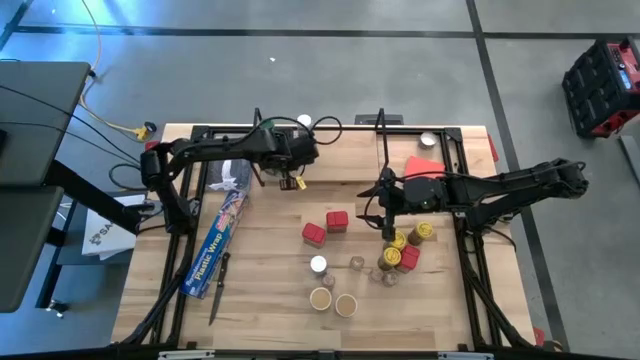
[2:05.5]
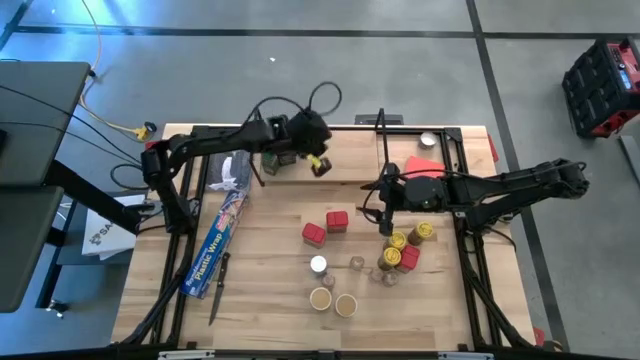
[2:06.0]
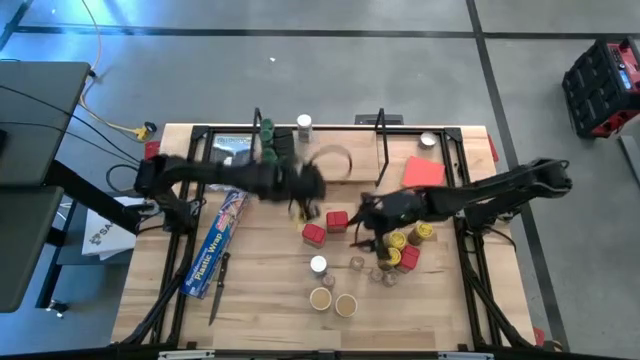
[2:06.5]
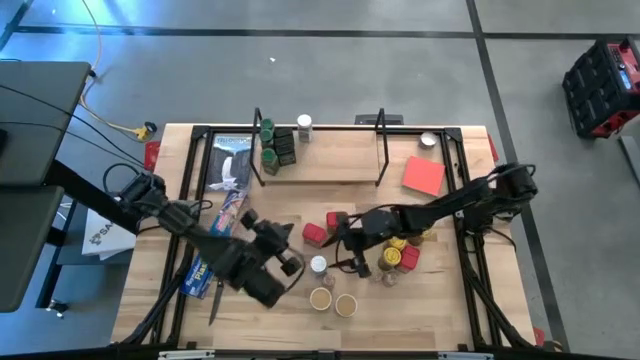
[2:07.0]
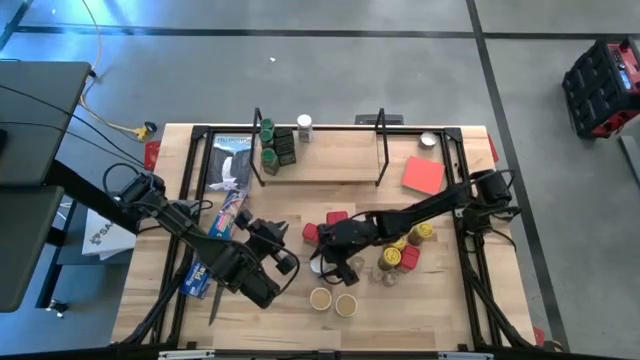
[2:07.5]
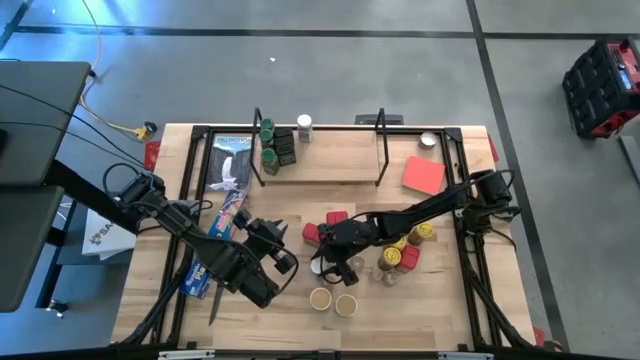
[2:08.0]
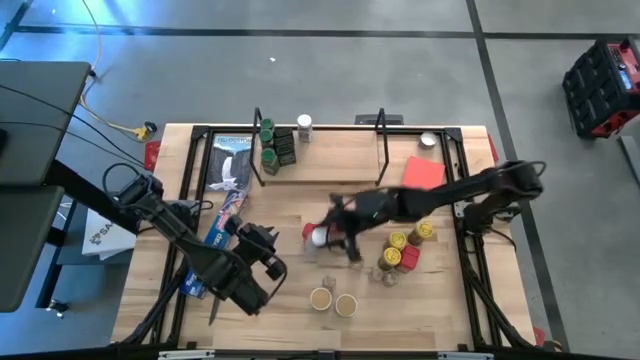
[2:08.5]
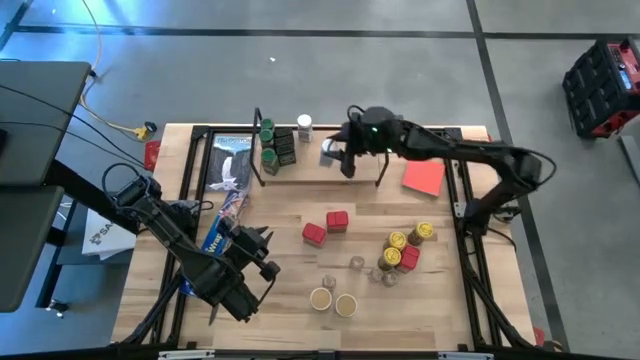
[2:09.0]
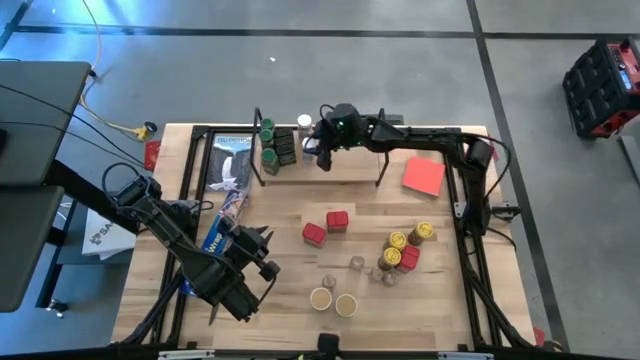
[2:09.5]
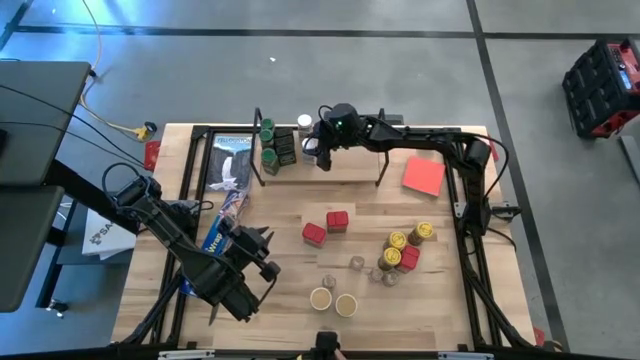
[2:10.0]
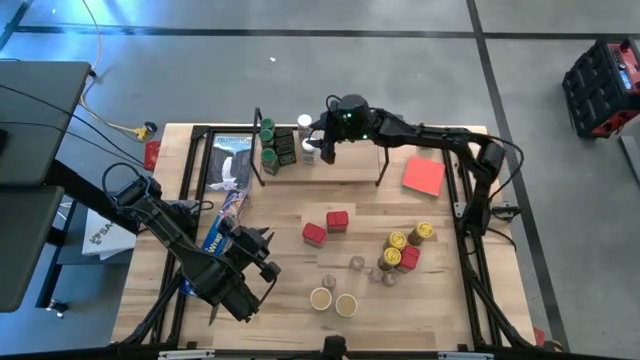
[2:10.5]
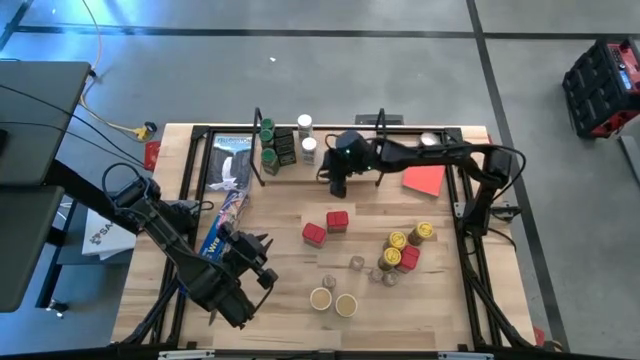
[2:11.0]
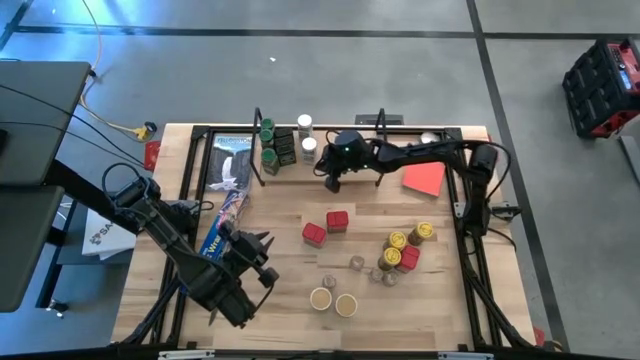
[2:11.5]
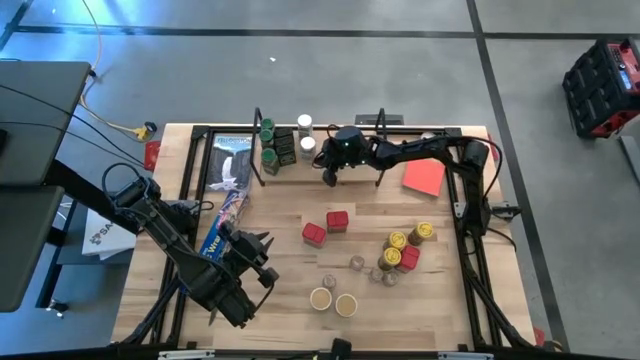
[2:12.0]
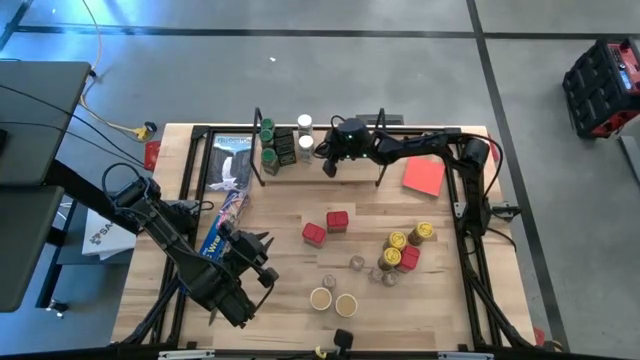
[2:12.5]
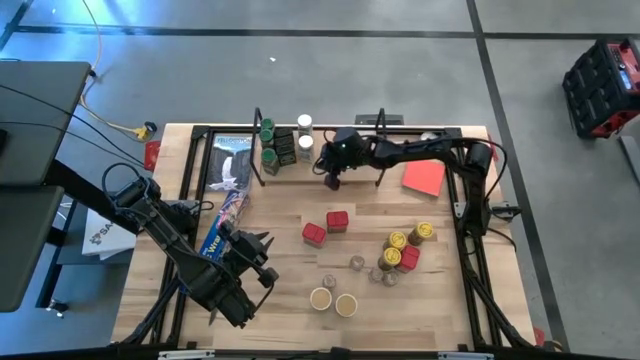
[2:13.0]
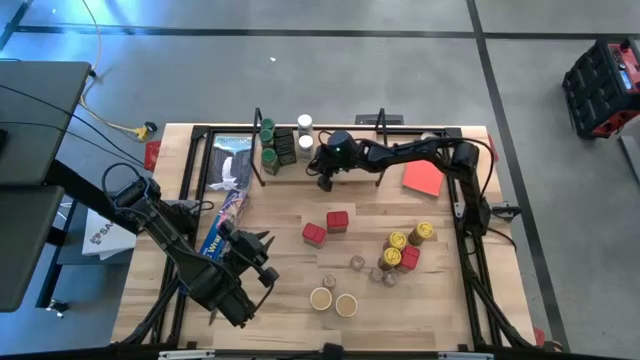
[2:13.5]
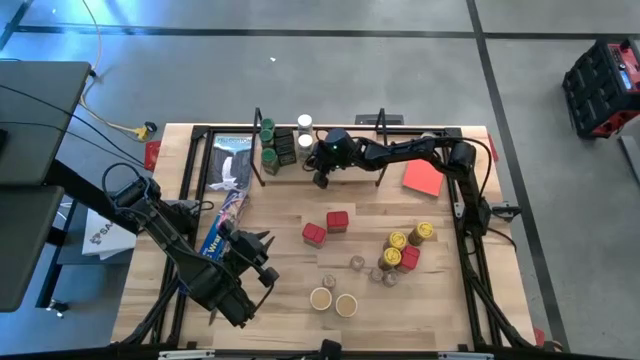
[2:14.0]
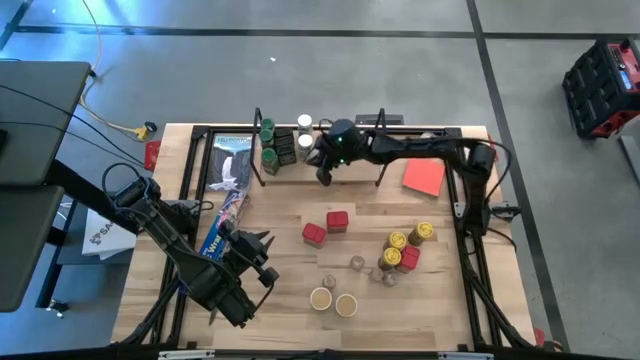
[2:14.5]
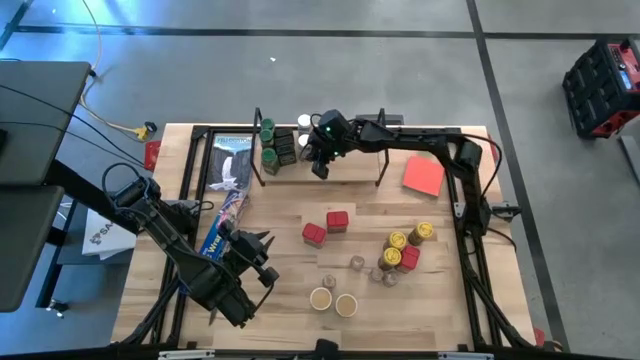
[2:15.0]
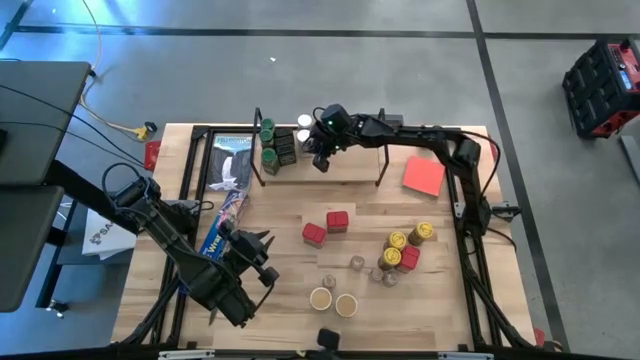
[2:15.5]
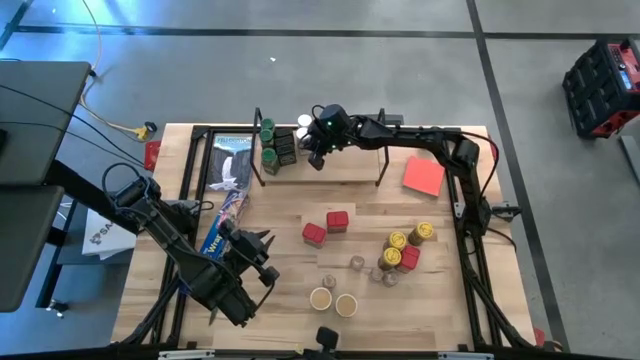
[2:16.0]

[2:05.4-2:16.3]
Task: Shelf spices
Put the white seasoning bottle on the shelf and align it with the other white seasoning bottle

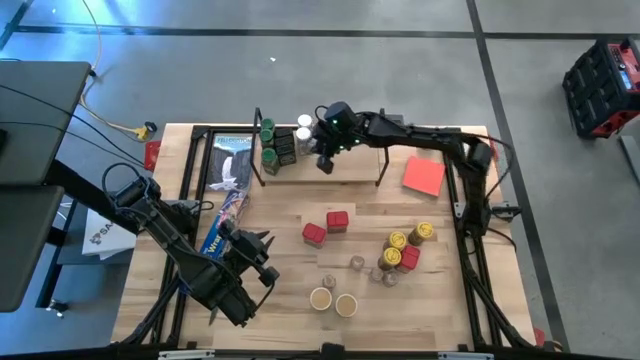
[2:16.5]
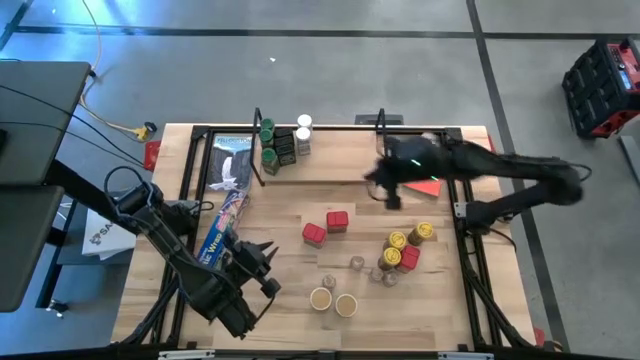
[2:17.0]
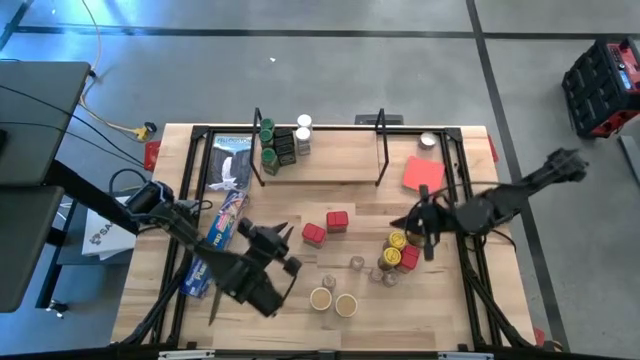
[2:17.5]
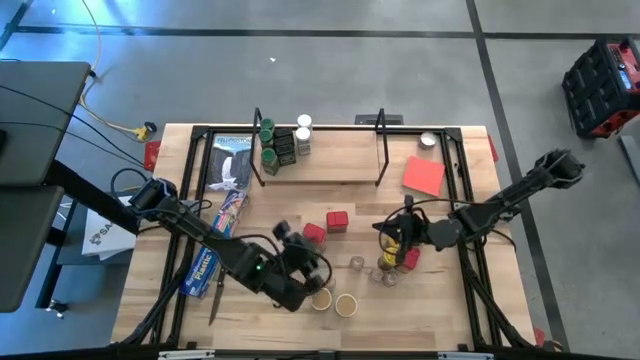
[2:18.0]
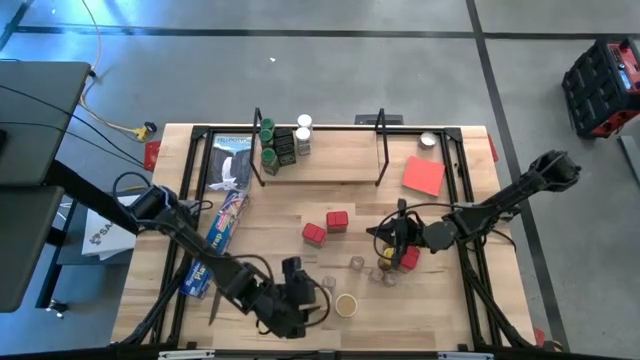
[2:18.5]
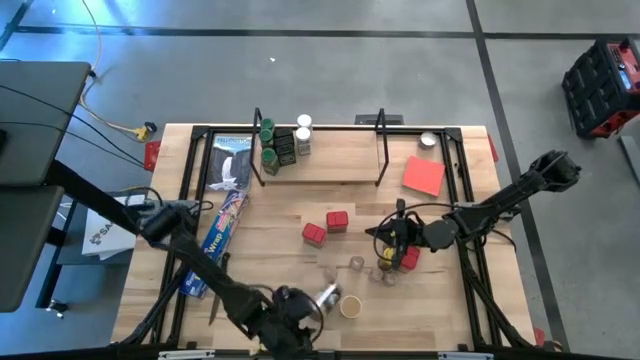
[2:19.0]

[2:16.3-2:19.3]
Put the gold seasoning bottle on the shelf to the top right of the white seasoning bottle

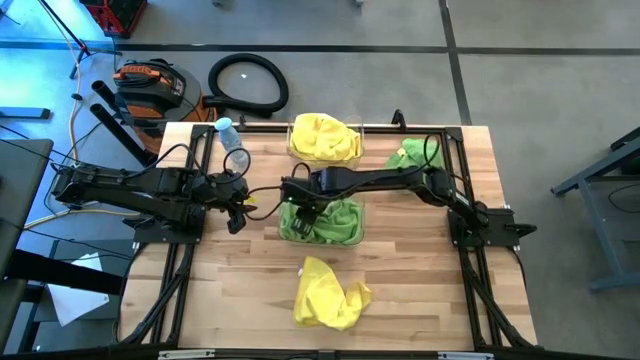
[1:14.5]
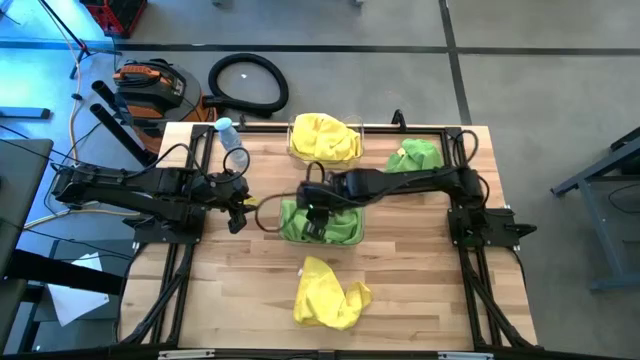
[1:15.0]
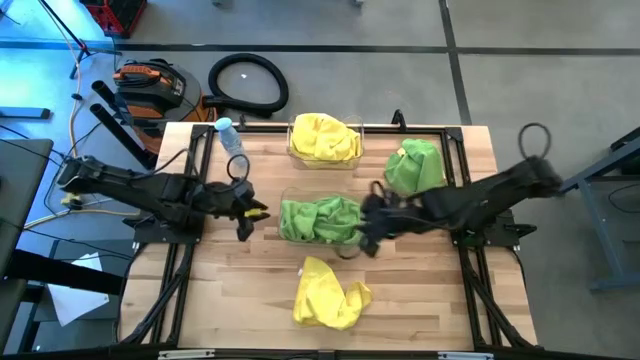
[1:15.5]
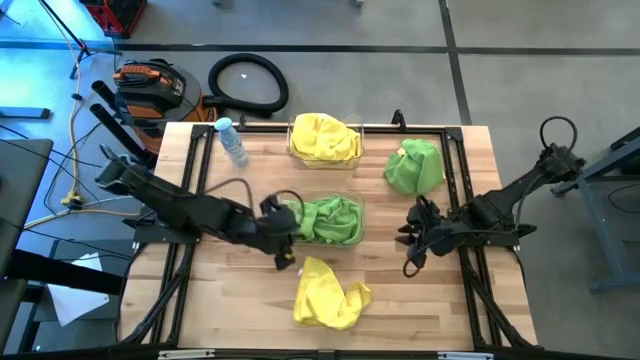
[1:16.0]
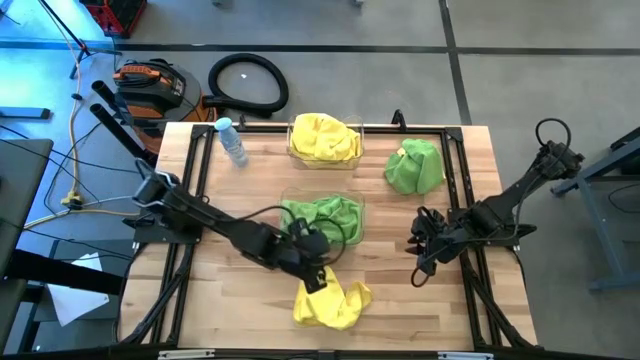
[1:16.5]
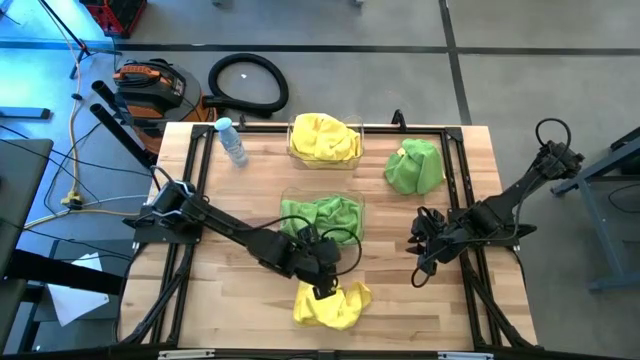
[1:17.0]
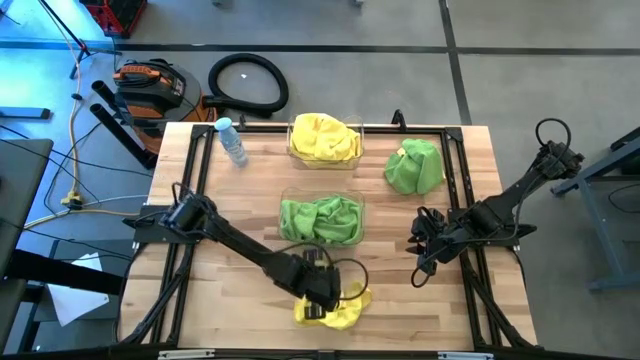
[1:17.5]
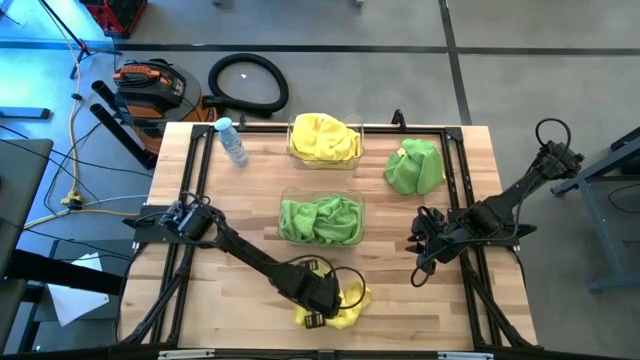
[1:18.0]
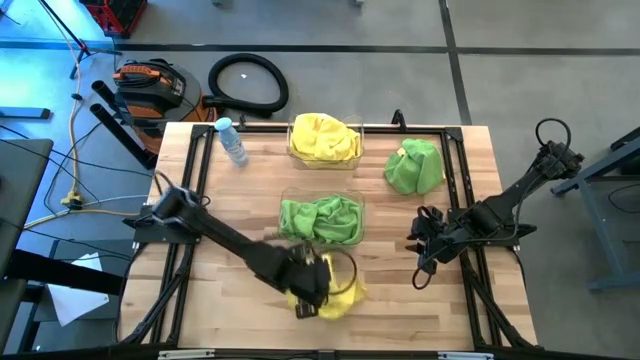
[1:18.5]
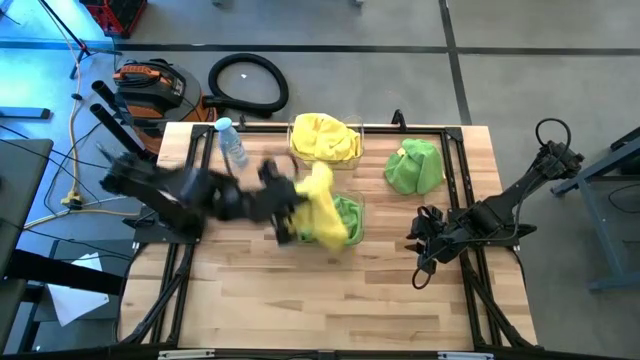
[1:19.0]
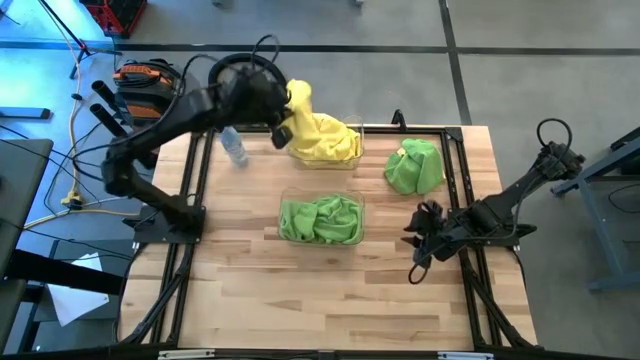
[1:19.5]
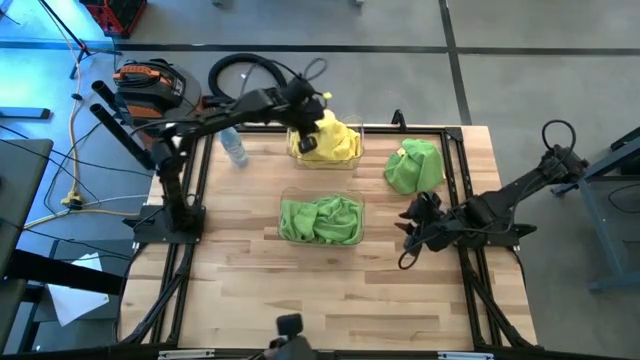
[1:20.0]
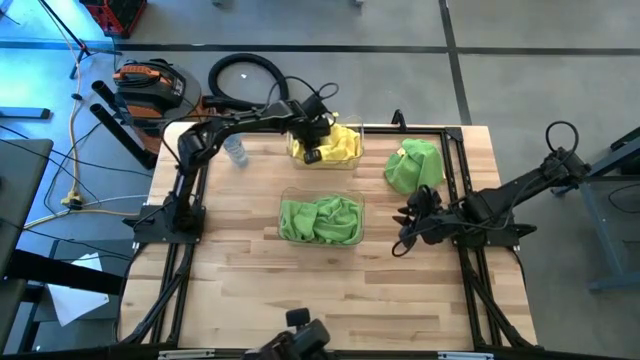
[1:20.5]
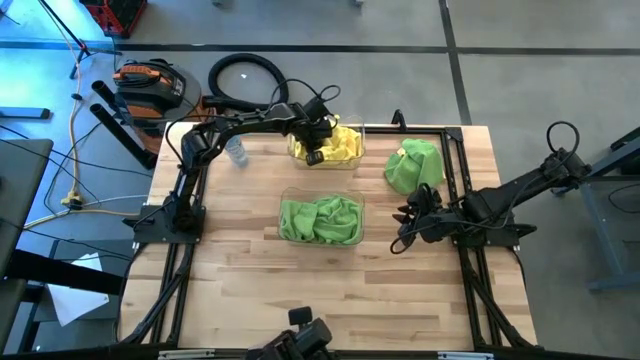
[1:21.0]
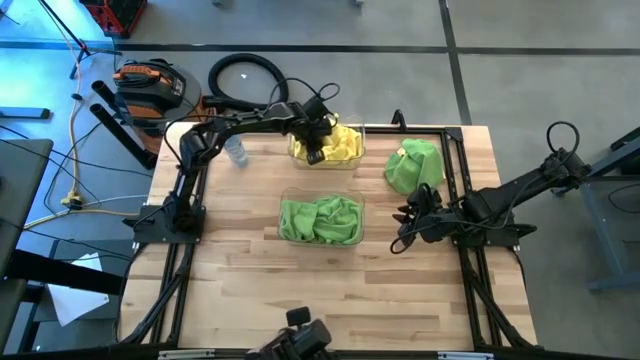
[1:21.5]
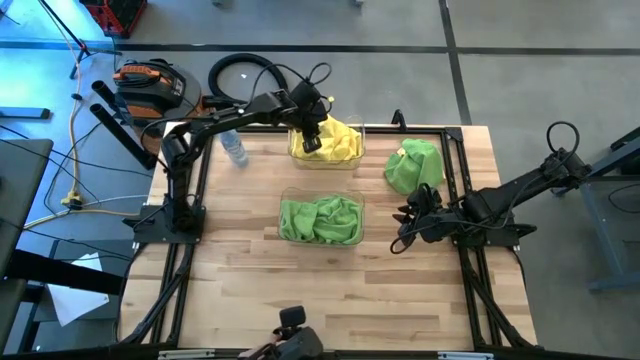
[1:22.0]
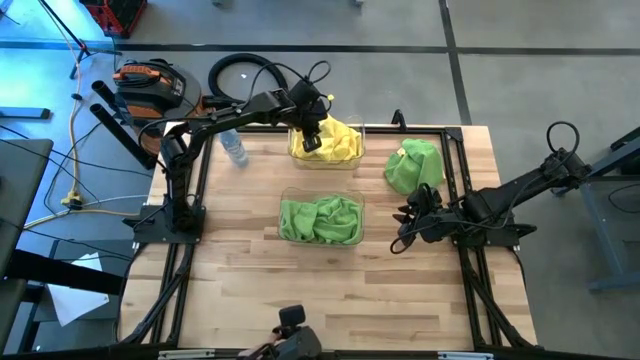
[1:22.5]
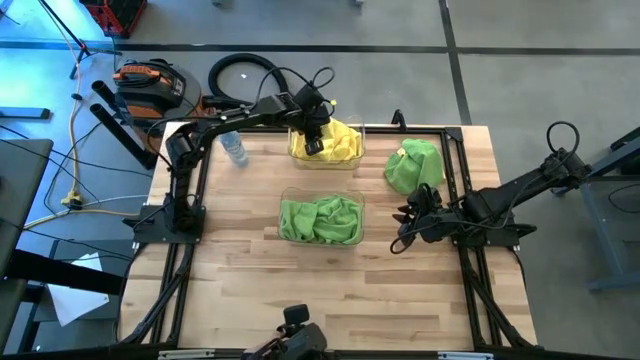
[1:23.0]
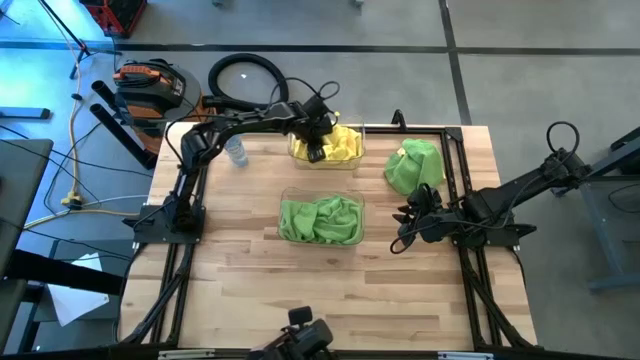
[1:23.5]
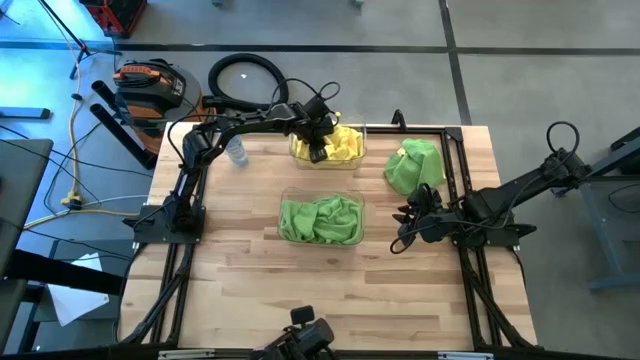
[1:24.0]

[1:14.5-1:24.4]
Task: Sort microfiber towel by color & place in baskets
Put the yellow towel into the top transparent bin
